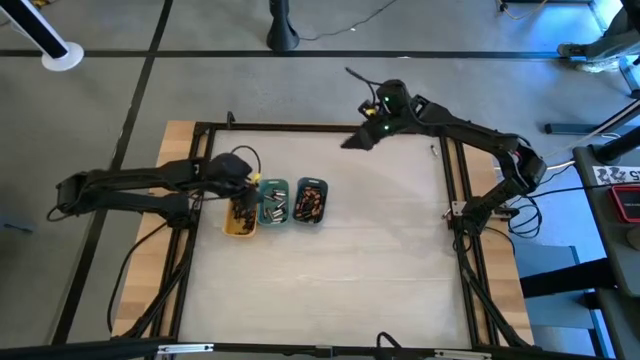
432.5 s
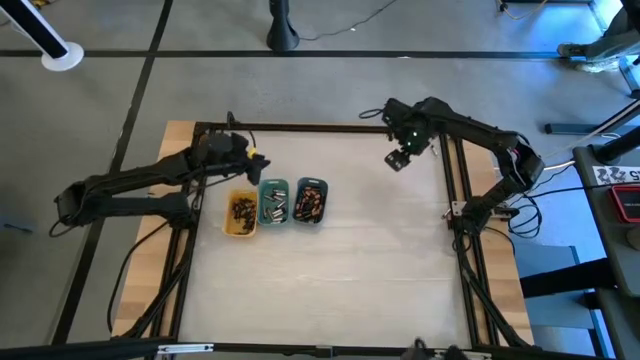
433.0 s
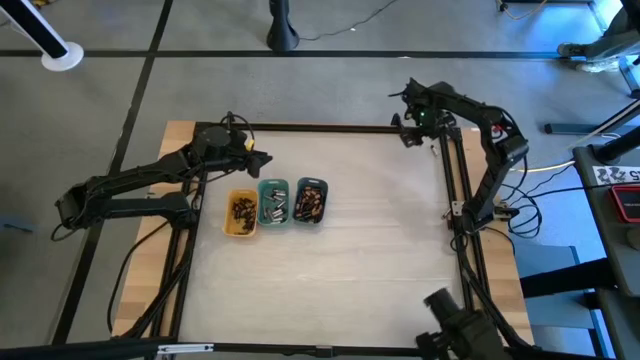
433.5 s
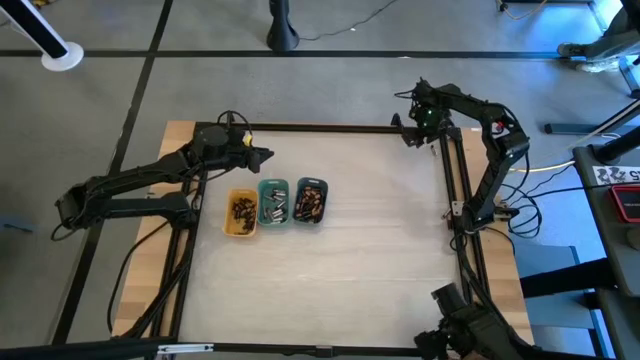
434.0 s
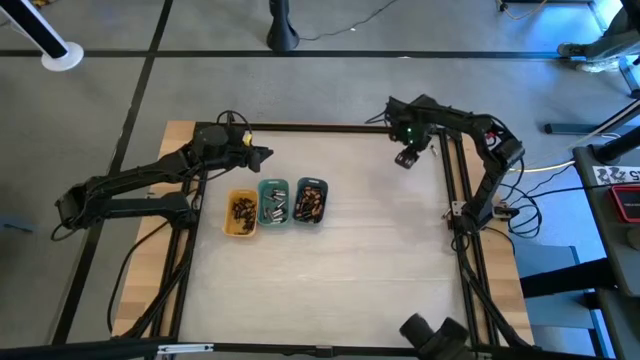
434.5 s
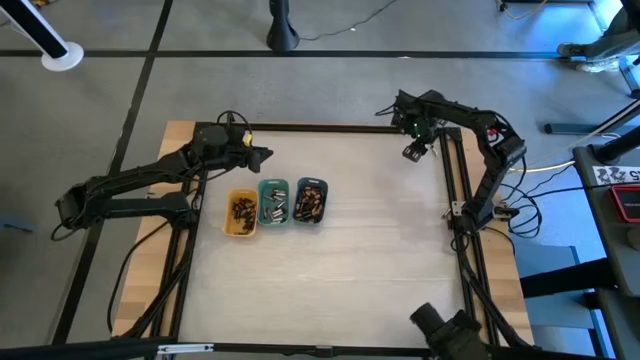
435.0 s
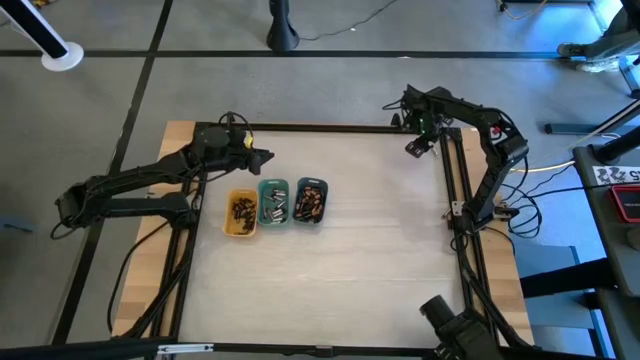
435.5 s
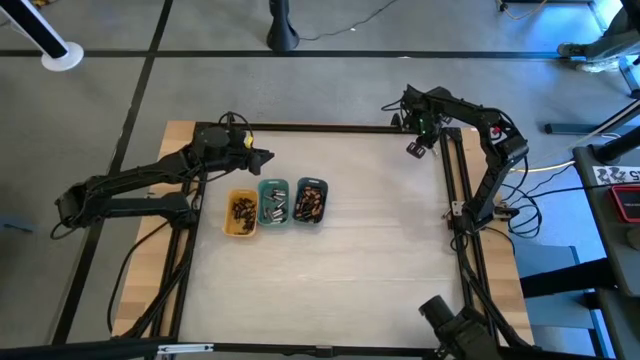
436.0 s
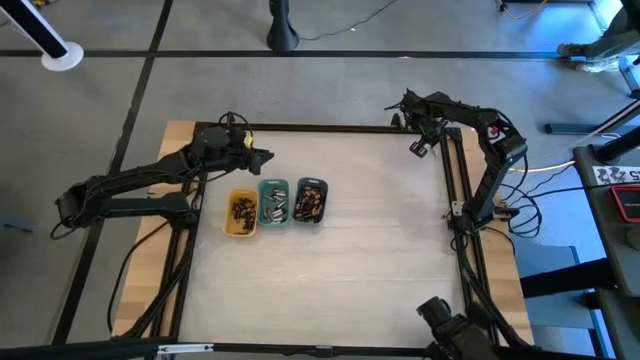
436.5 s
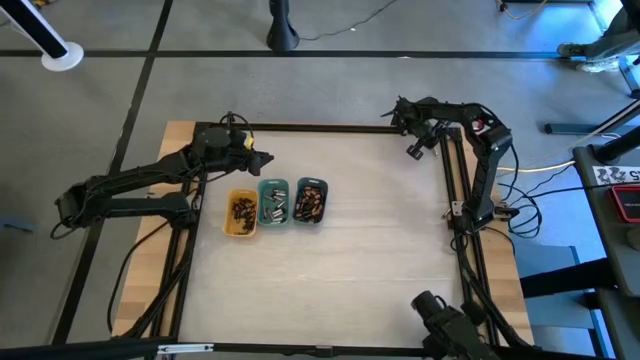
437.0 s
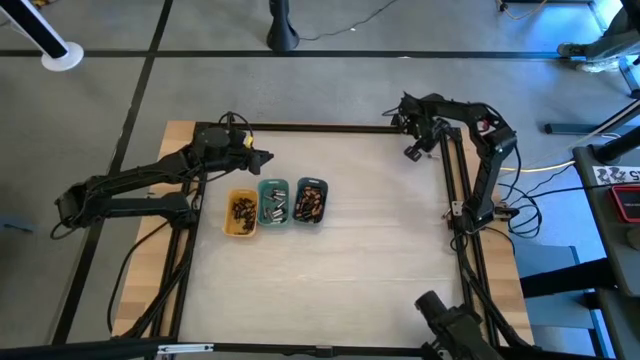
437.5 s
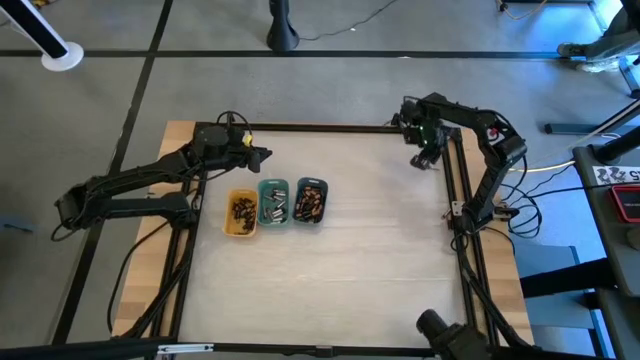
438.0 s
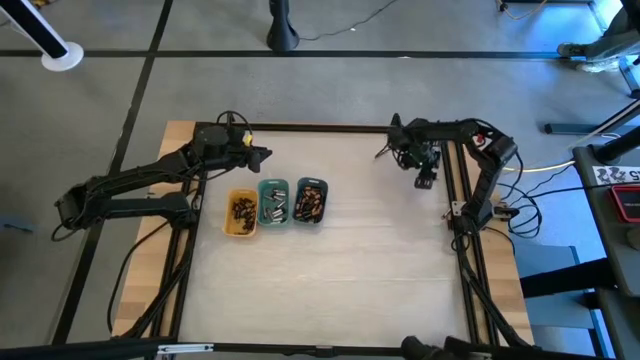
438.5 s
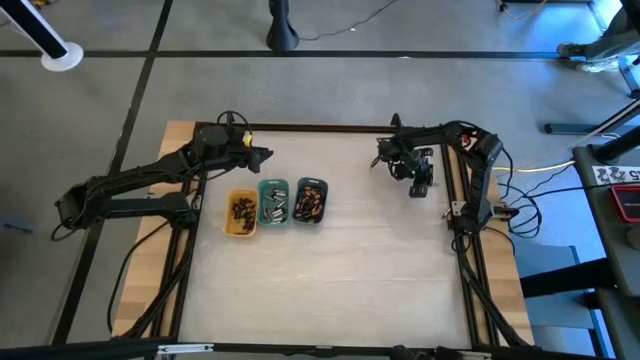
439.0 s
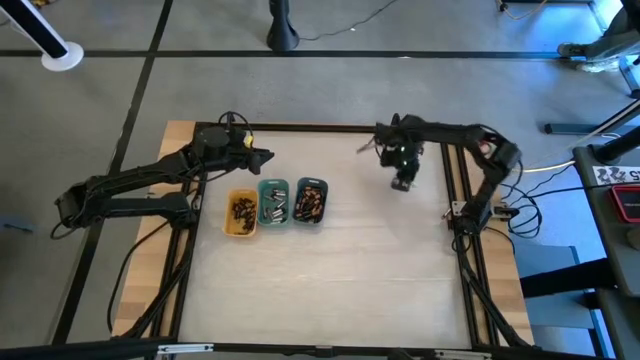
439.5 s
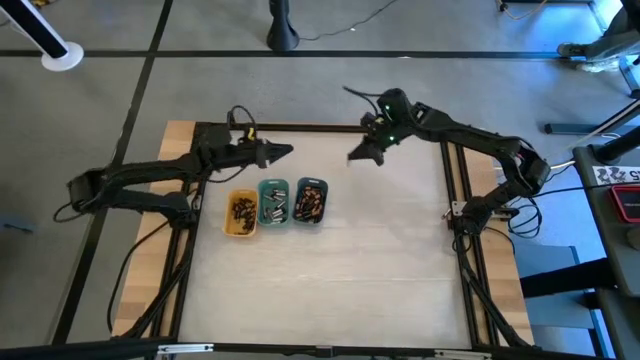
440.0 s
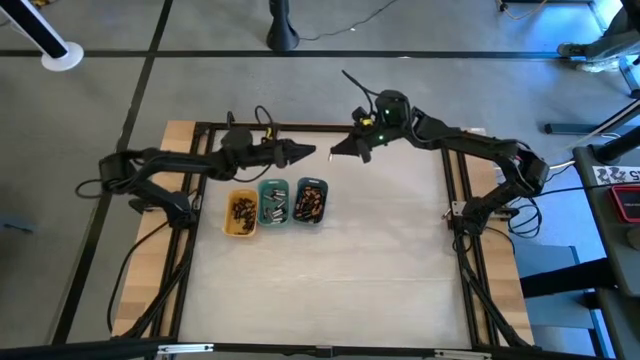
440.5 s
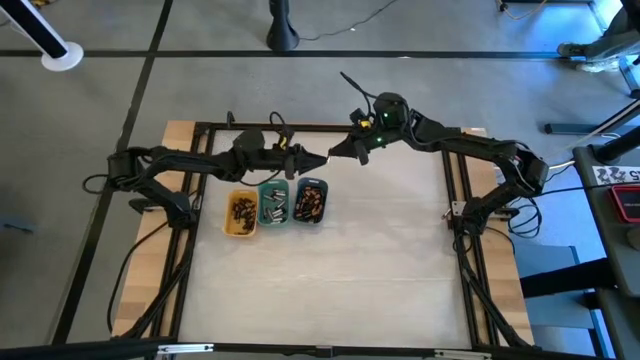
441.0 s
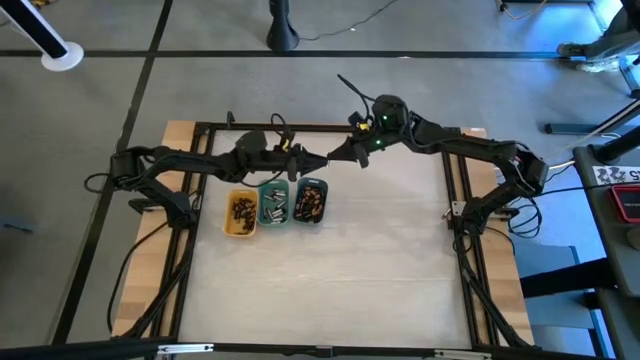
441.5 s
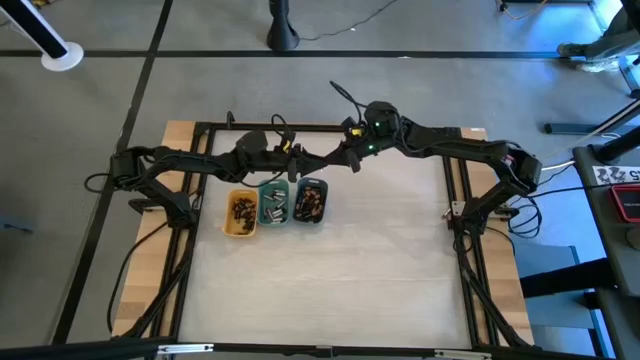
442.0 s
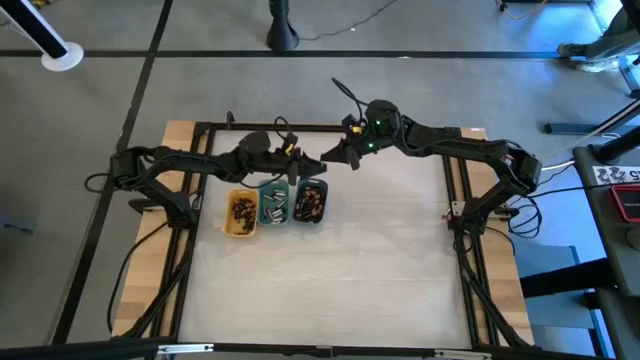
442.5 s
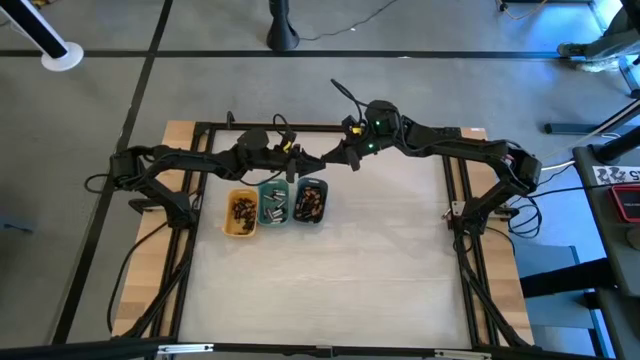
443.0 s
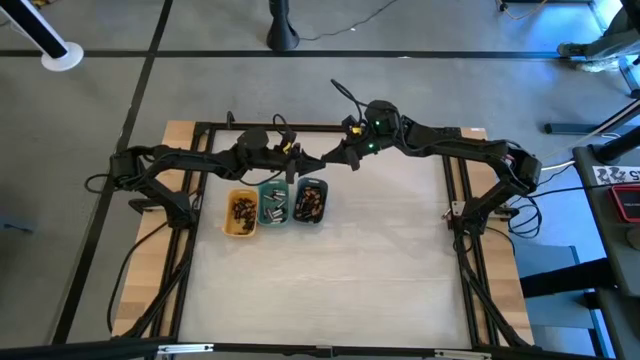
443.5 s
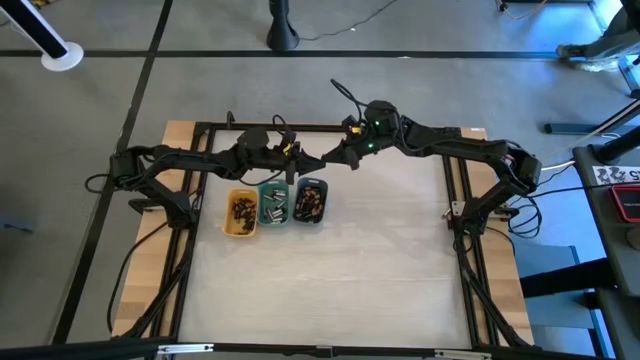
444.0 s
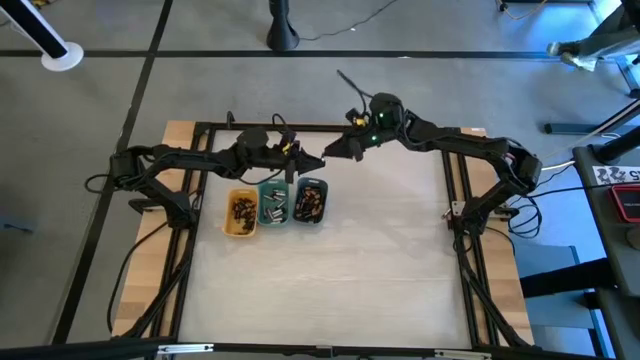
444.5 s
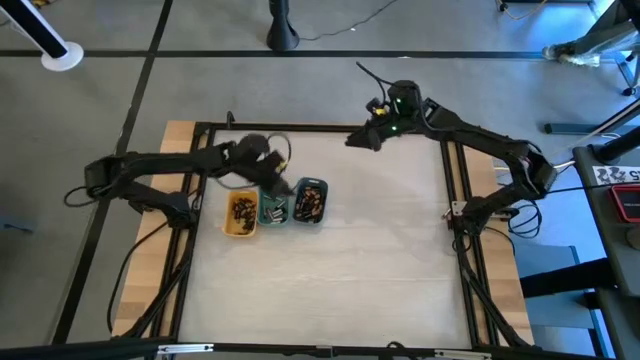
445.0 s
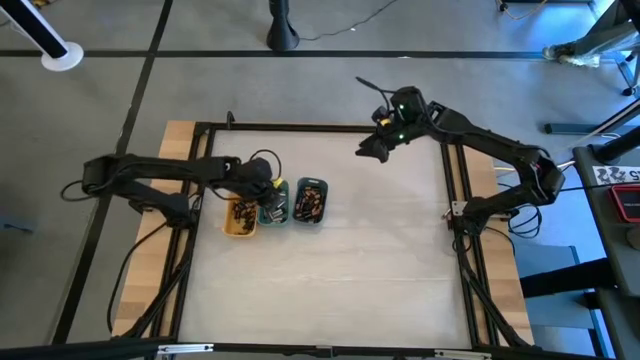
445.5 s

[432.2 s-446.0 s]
Task: Sort batteries
Put the silver battery into the green bin

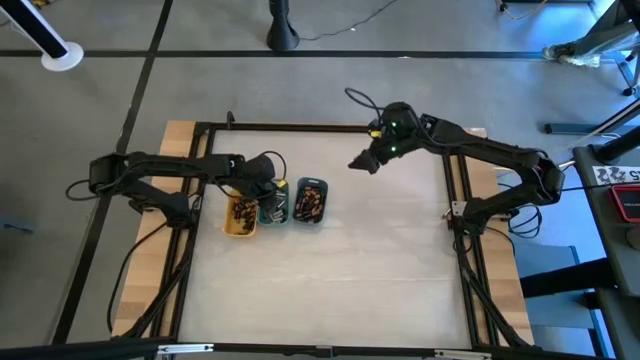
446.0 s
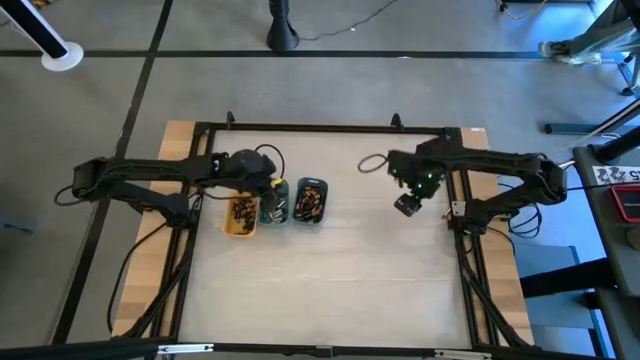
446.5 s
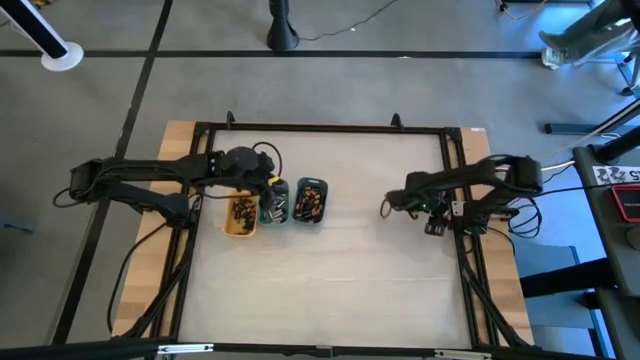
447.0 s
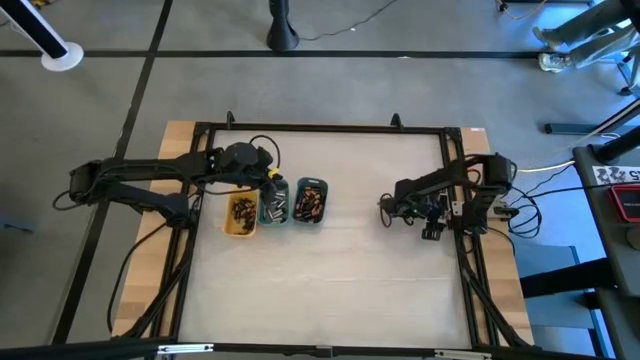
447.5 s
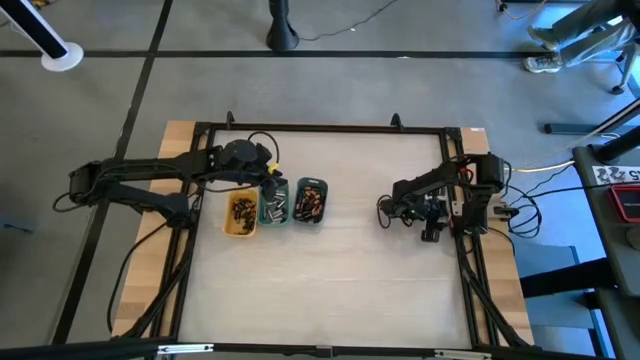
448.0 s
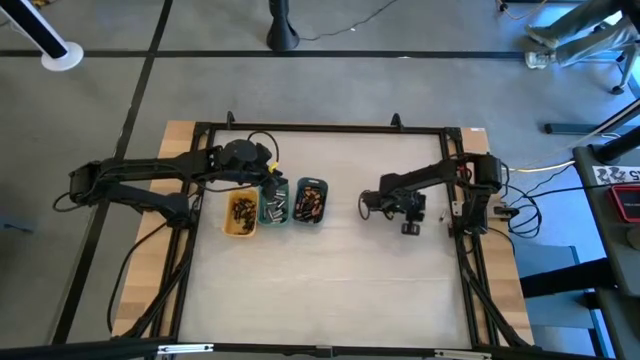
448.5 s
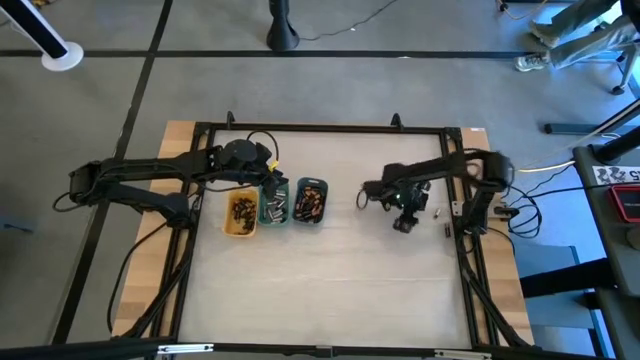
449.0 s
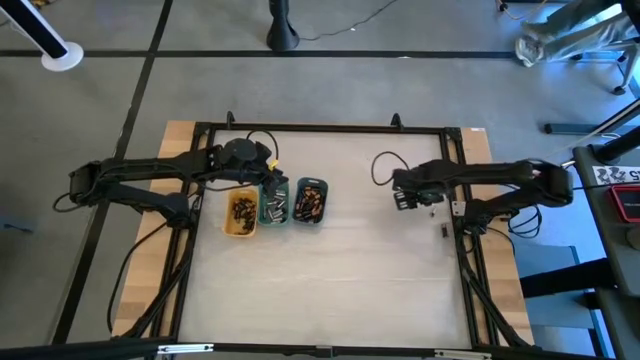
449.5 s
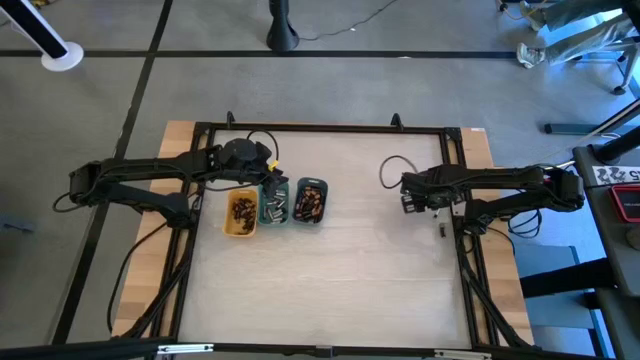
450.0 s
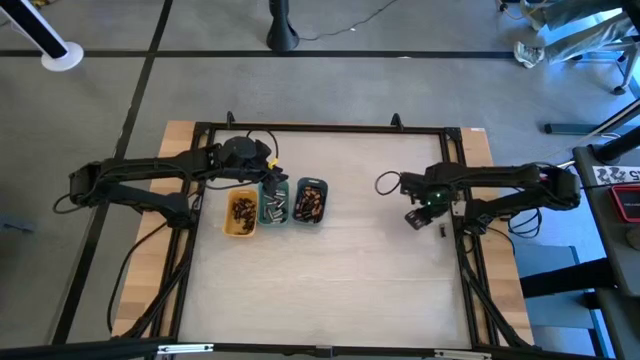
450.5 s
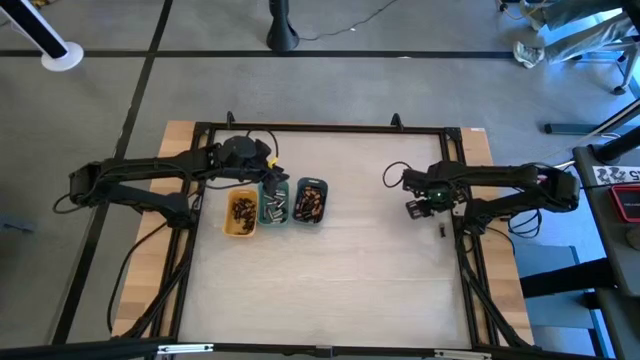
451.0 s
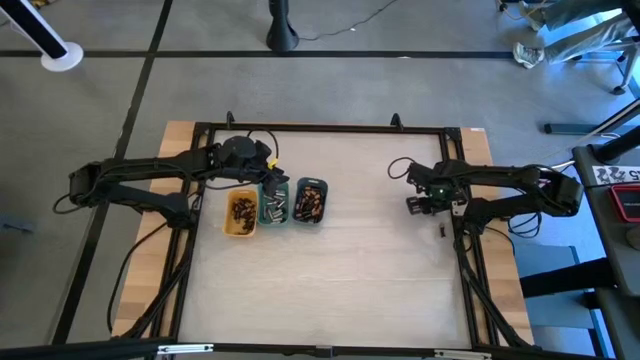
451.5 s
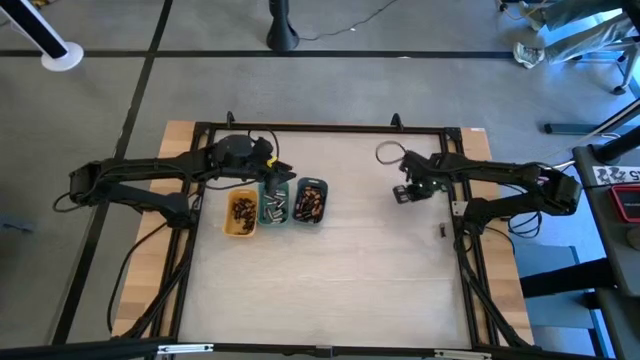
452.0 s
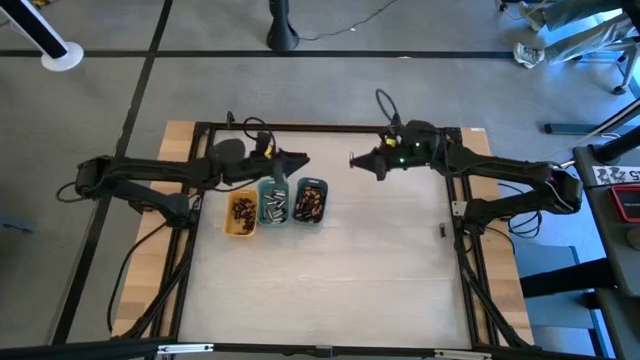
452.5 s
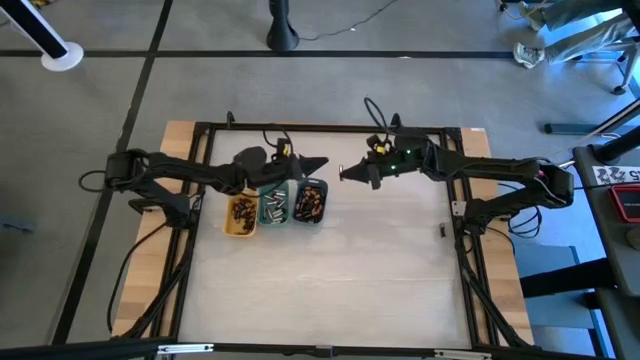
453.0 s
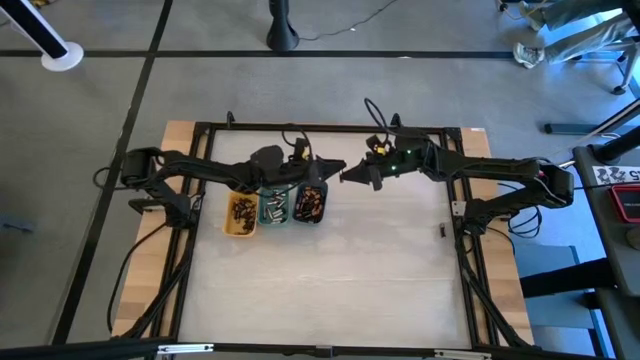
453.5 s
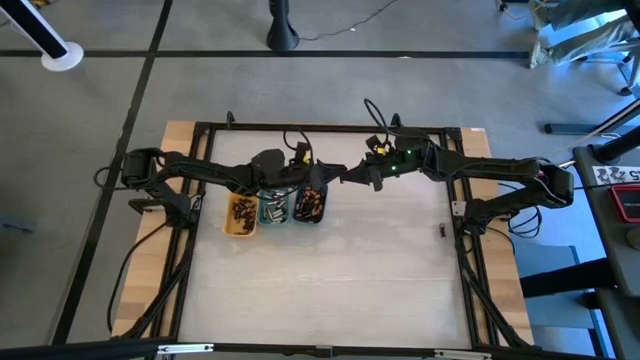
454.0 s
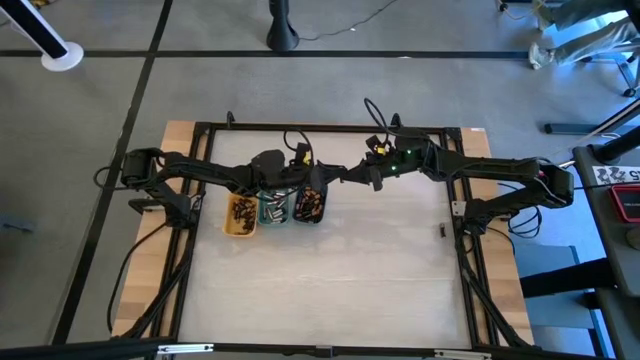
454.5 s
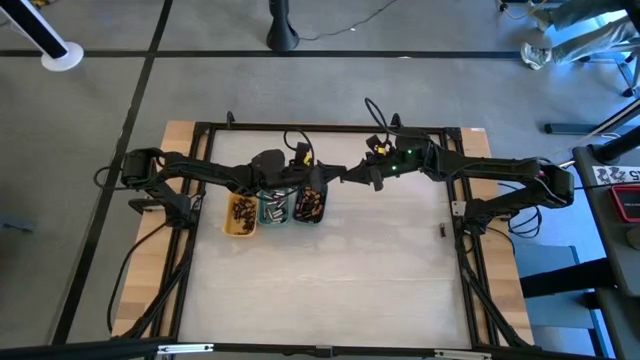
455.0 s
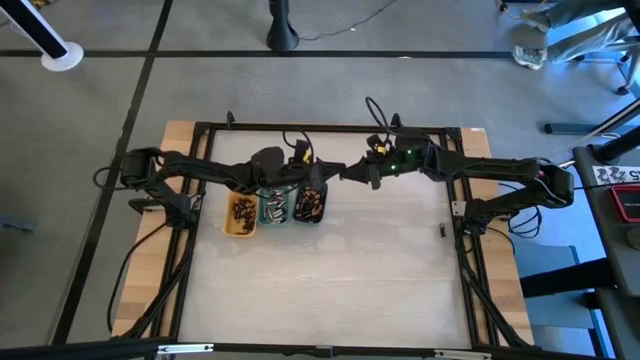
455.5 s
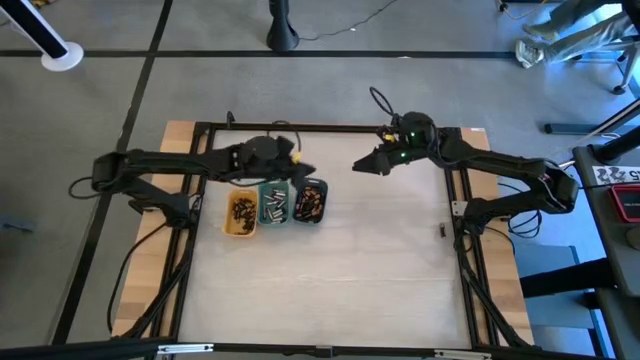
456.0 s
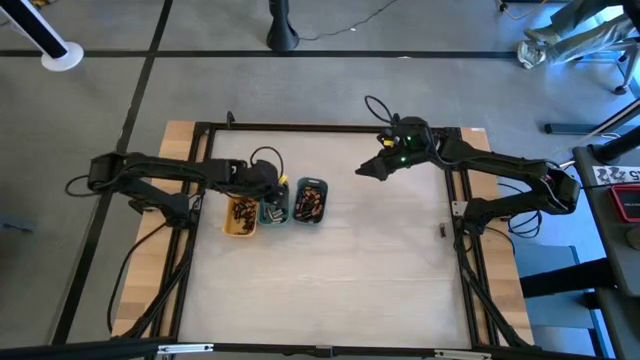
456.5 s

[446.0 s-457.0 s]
Put the silver battery into the green bin
